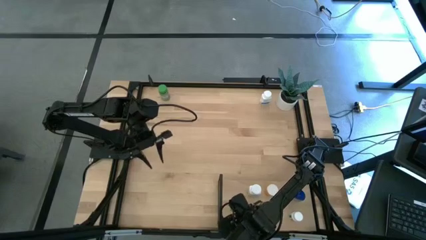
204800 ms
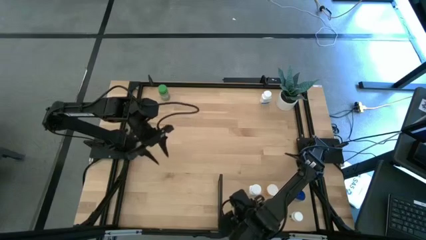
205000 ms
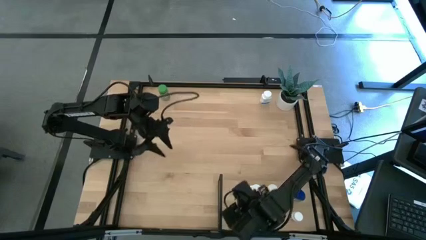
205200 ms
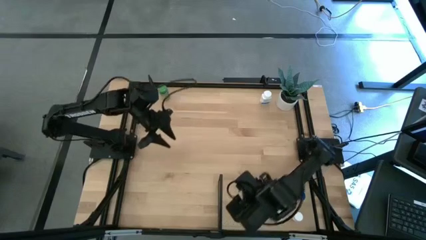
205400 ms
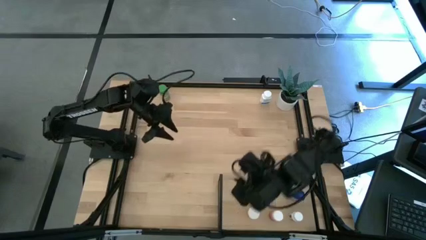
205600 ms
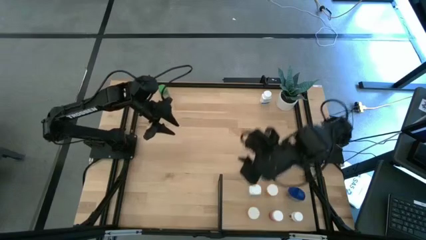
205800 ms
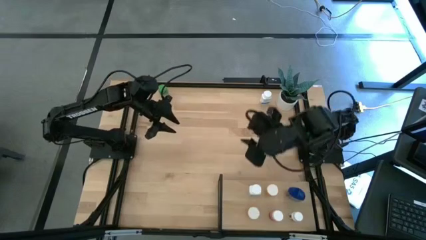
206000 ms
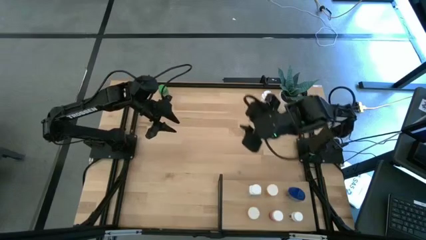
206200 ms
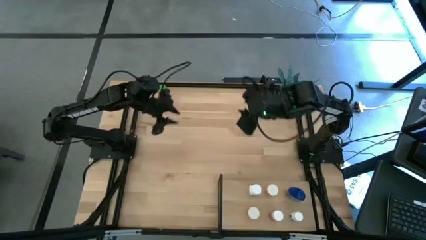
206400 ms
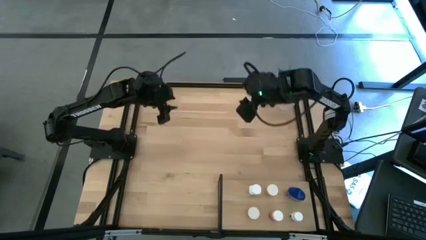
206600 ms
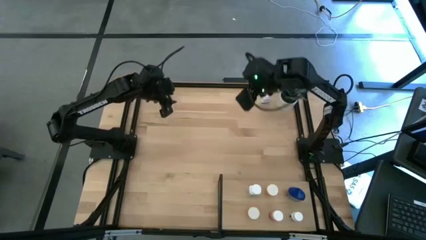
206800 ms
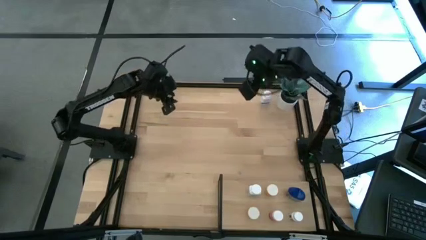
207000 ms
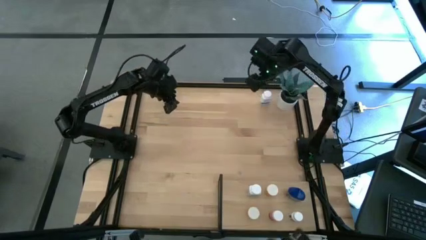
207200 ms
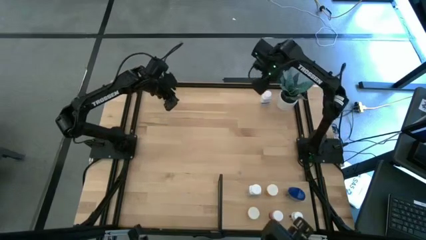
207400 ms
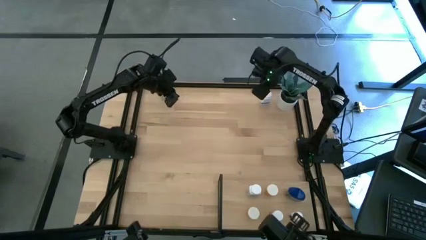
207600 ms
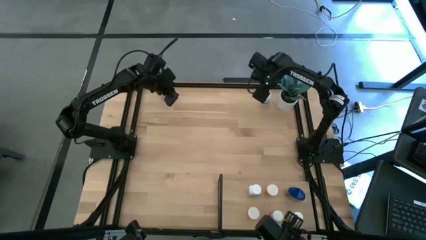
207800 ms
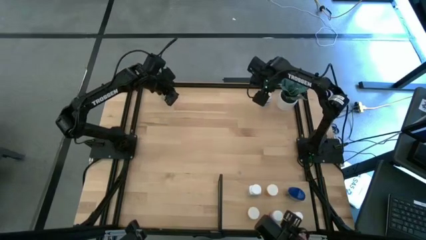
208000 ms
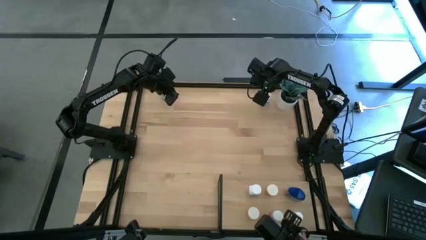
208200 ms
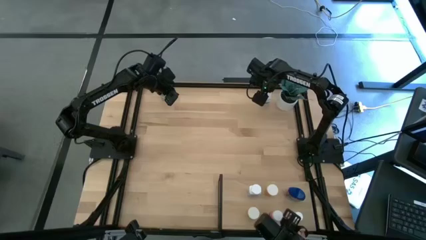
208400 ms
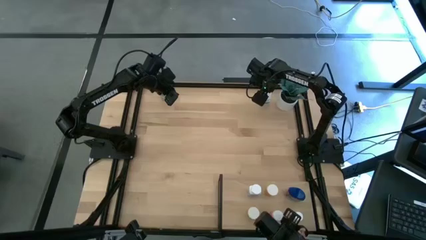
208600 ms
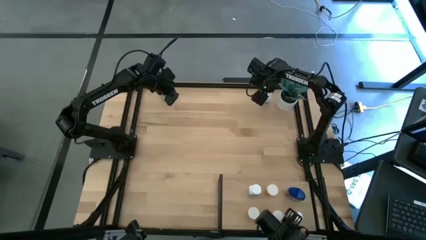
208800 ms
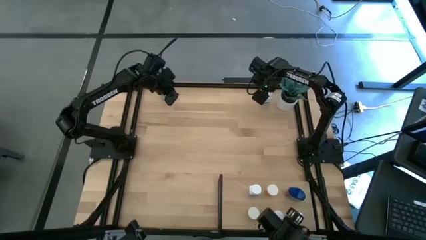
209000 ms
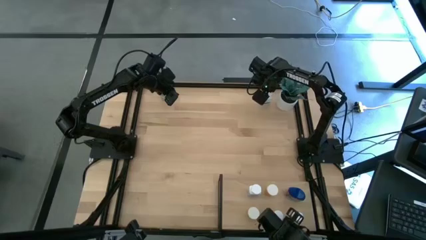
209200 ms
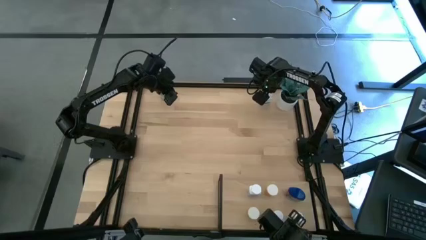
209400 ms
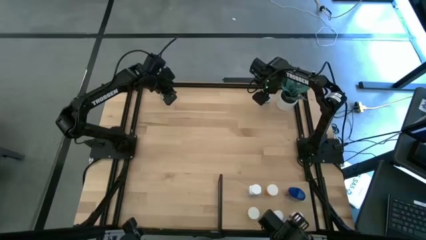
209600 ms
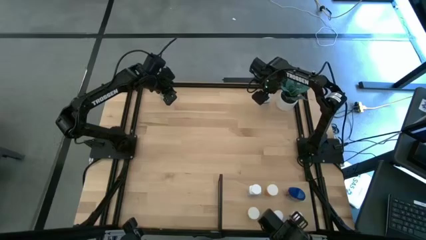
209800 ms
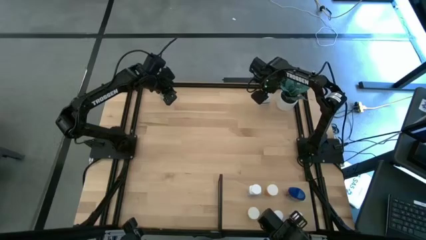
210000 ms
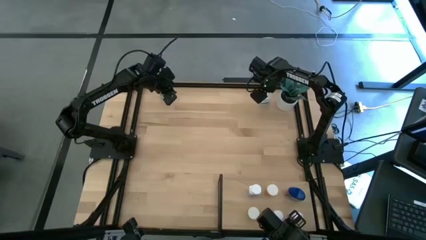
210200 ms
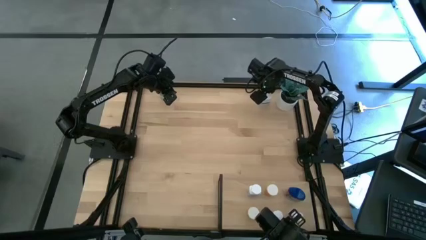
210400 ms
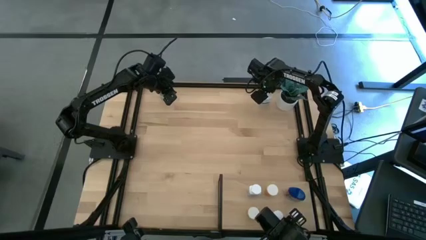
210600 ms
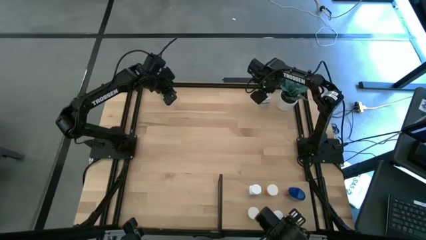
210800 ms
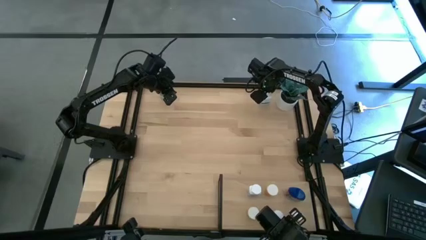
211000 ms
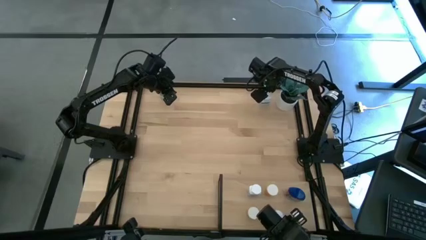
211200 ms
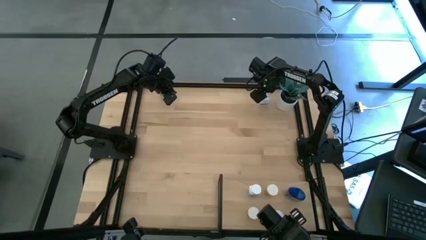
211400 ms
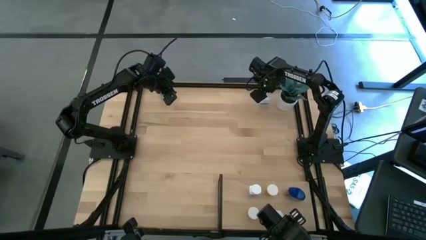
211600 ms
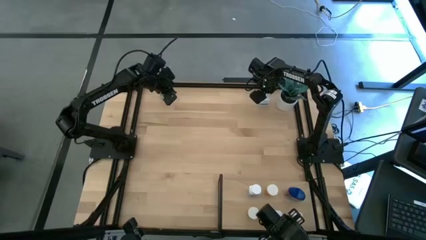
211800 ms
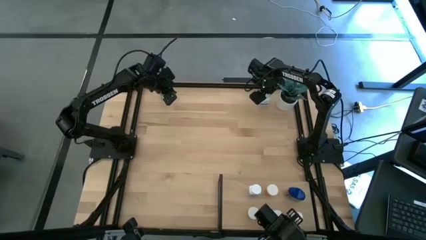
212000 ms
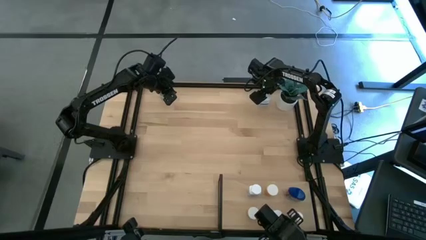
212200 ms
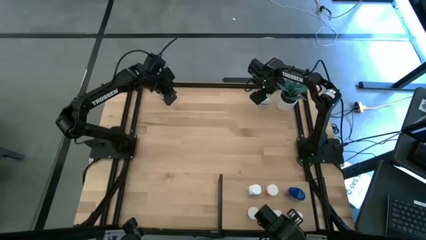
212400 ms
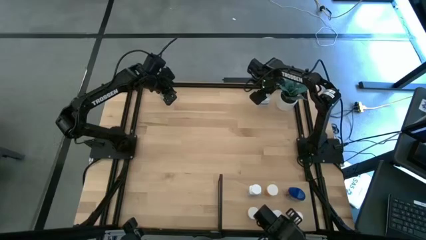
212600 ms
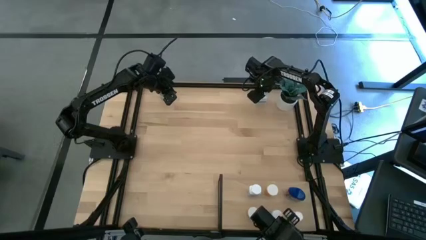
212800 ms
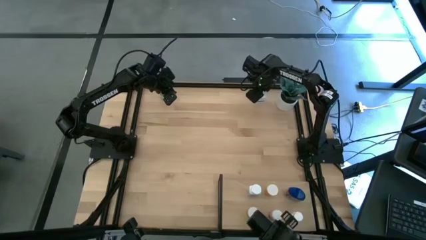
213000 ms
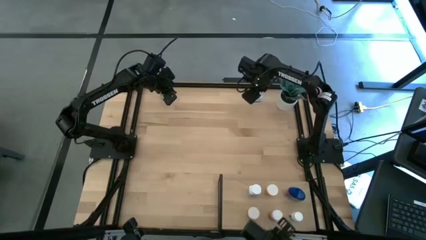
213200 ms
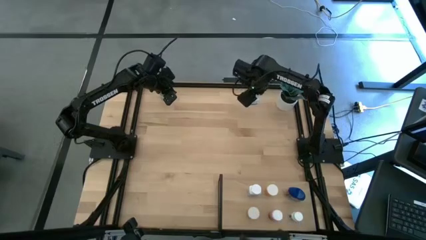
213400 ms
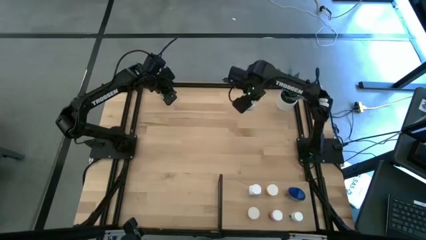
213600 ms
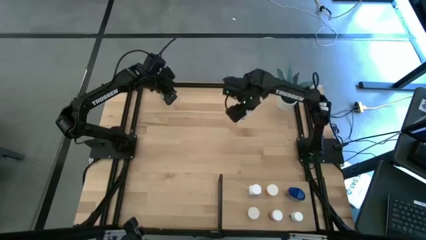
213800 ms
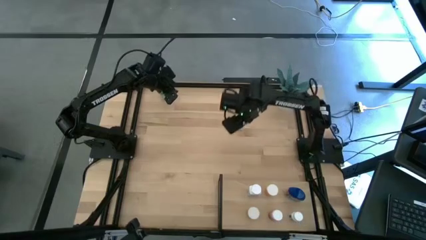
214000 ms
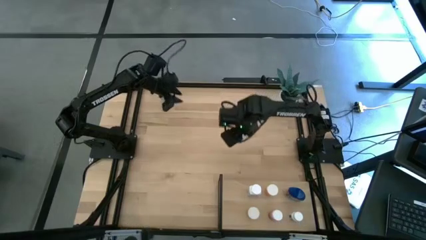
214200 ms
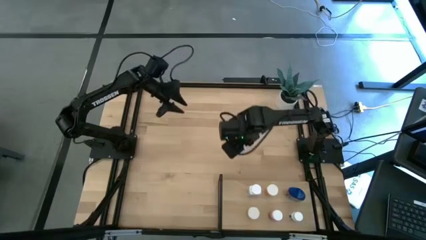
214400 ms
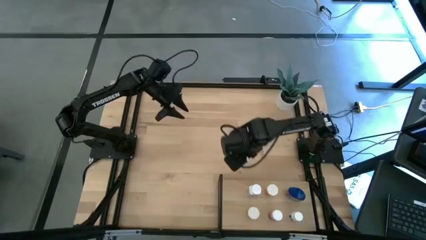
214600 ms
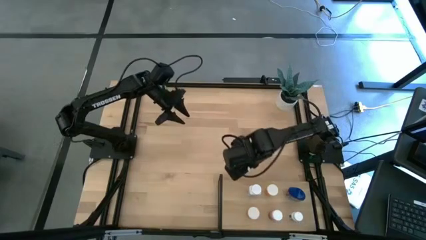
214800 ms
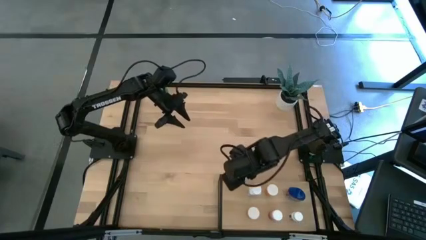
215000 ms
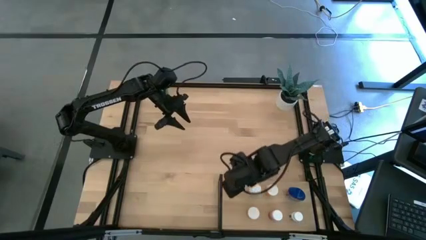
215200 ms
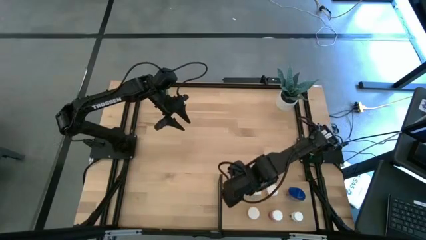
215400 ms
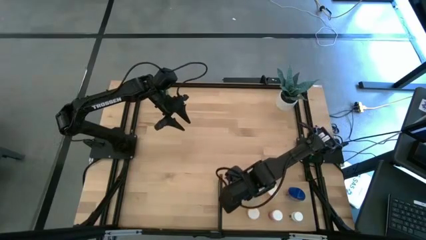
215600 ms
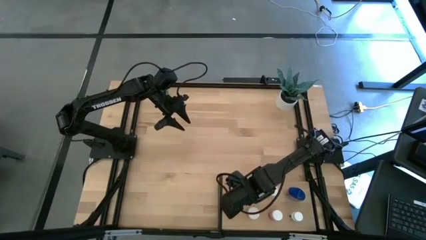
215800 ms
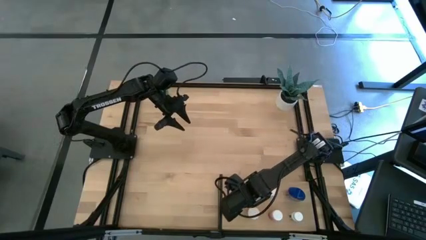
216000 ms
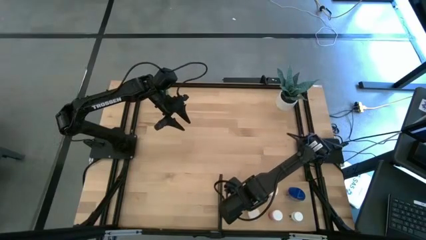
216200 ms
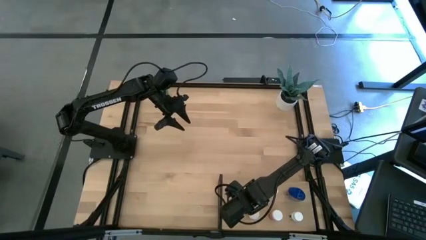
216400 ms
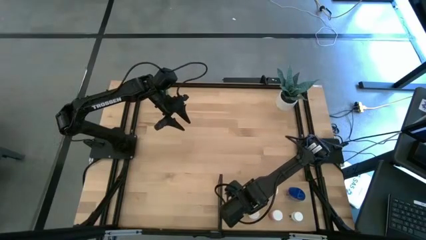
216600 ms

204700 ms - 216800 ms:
Task: Pick and place medicine bottles onto shelf by color
Put the white pill bottle onto the shelf

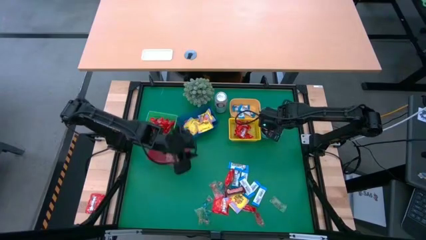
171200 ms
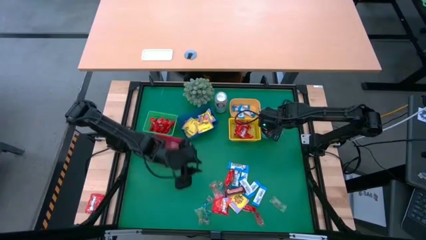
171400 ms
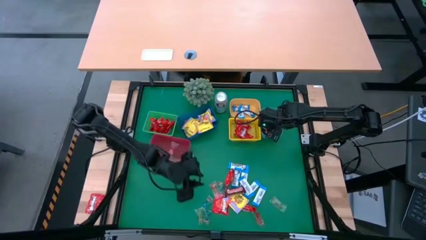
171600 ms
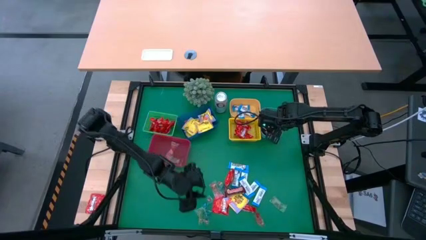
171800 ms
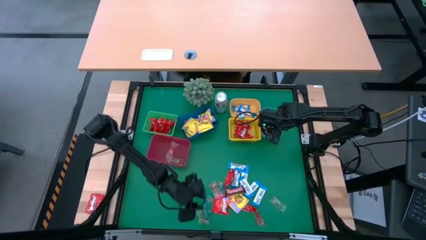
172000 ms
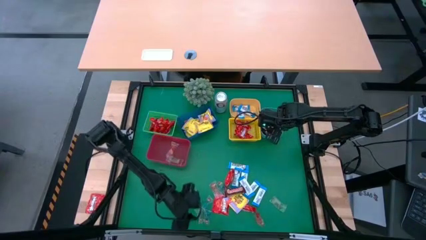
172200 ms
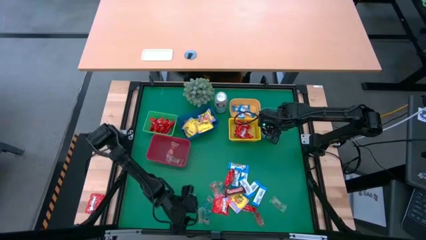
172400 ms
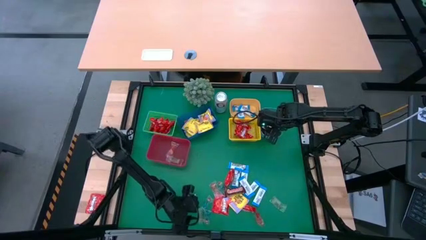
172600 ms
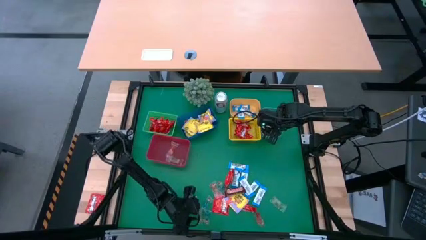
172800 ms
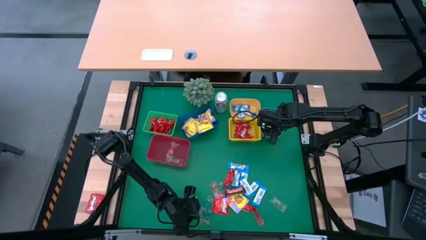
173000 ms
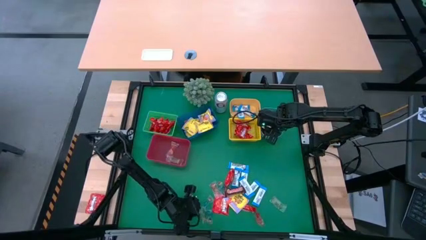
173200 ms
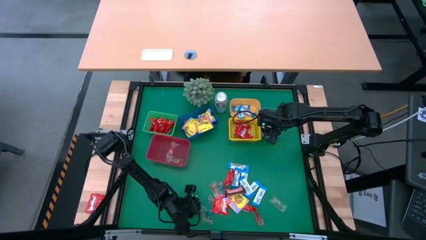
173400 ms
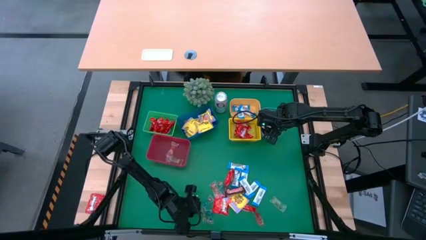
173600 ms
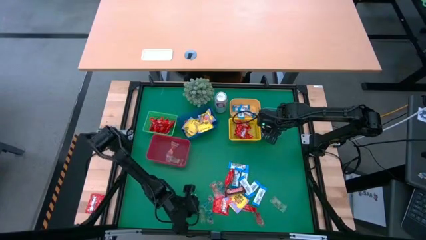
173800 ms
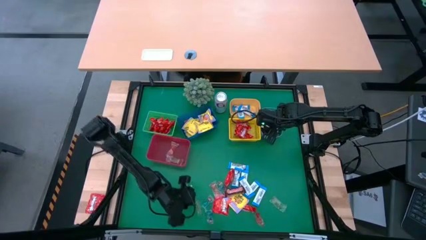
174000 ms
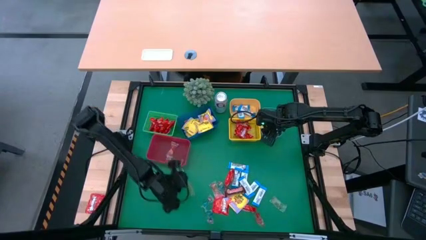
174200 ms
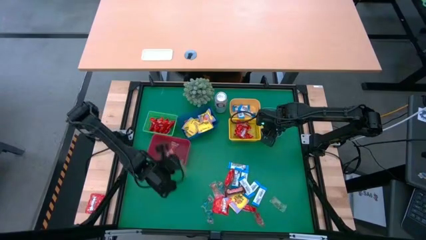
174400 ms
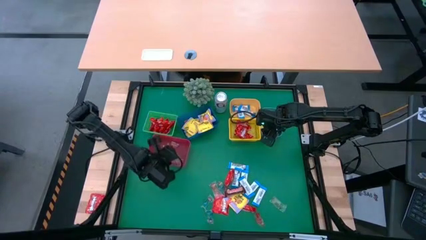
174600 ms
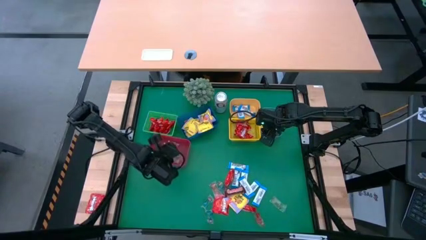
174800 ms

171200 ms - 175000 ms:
Task: Sort candy
Put the transparent green candy pack into the red bin

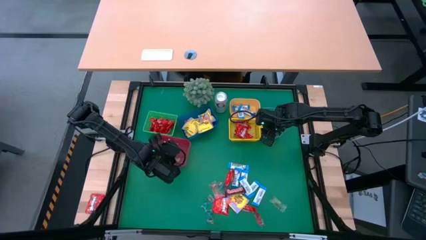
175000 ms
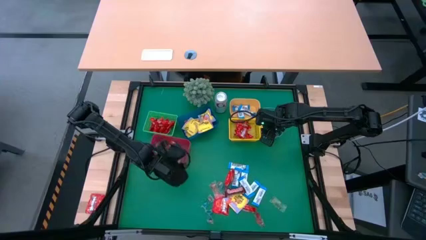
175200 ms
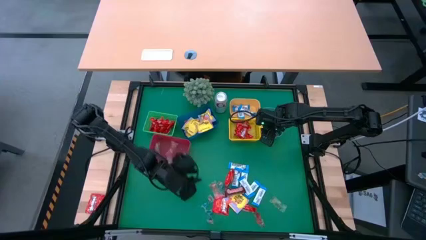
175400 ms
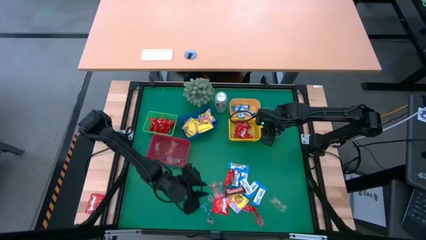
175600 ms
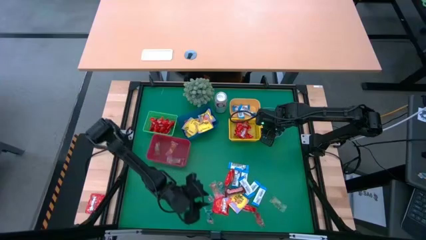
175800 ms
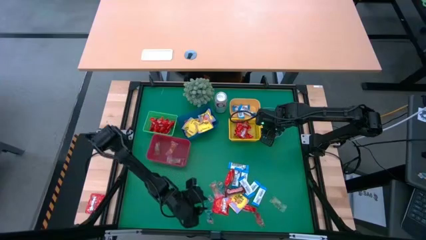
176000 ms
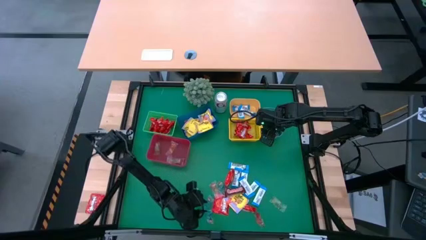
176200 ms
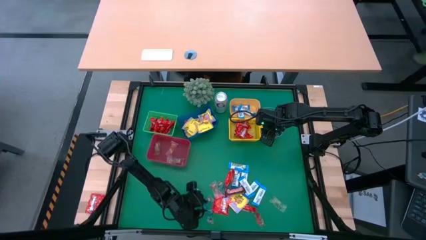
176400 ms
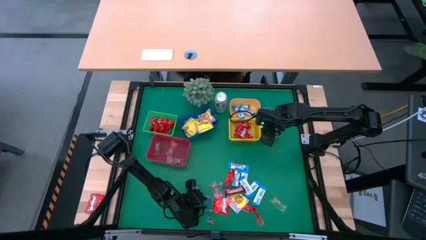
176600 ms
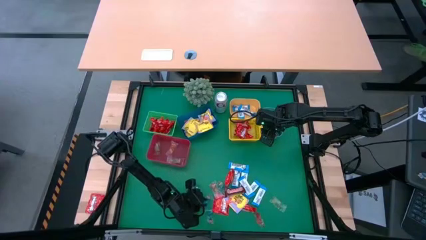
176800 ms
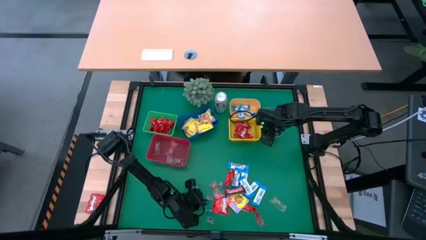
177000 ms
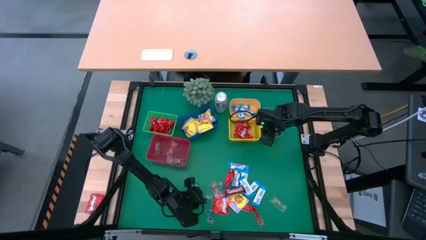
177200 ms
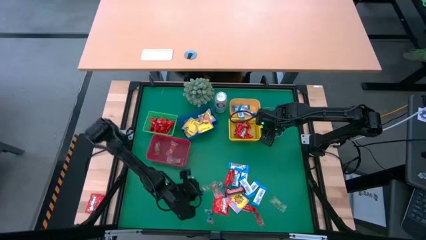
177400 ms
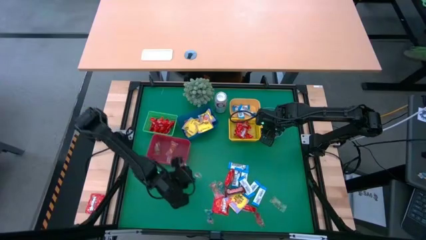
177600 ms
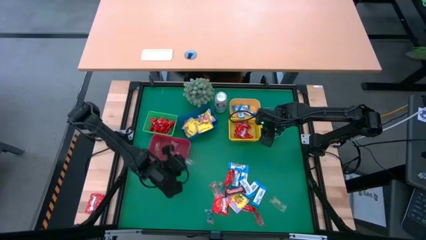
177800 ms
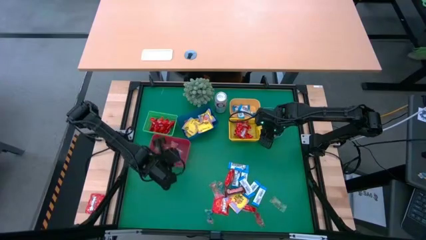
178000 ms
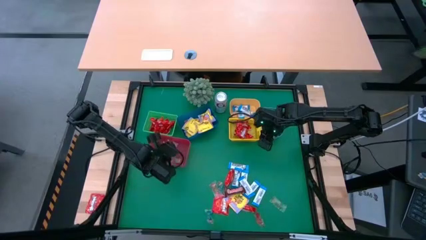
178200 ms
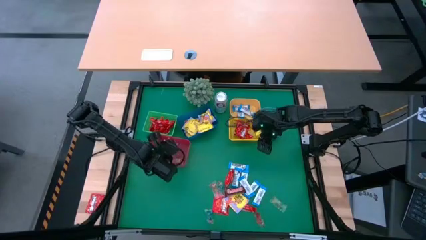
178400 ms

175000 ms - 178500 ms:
Put the transparent blue candy pack into the red bin
